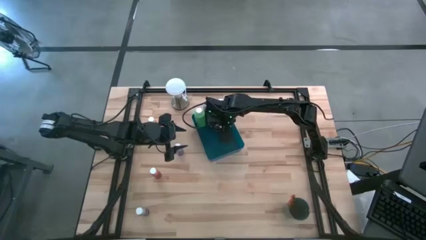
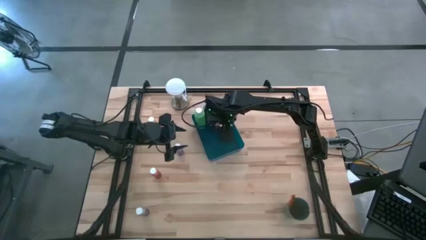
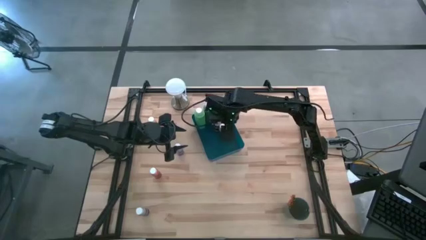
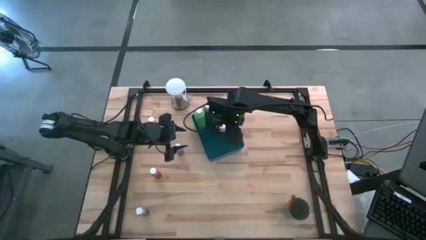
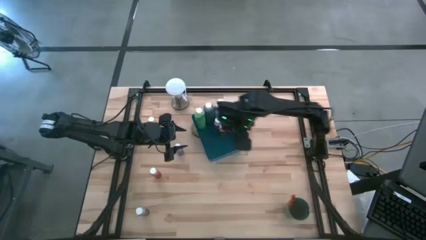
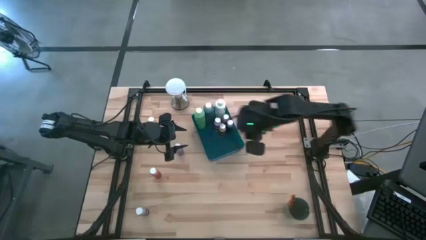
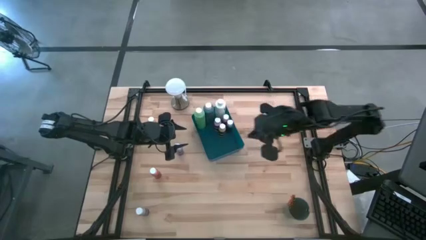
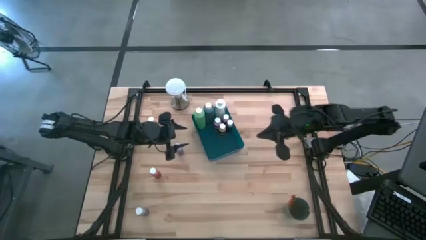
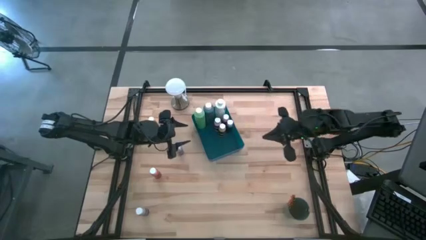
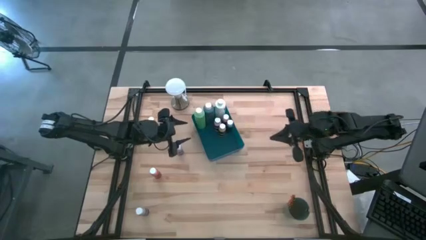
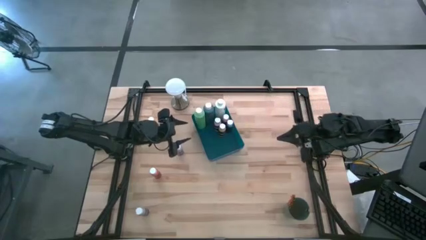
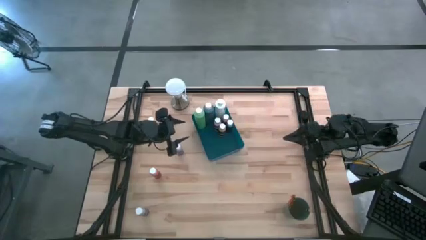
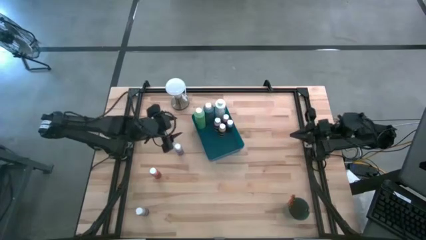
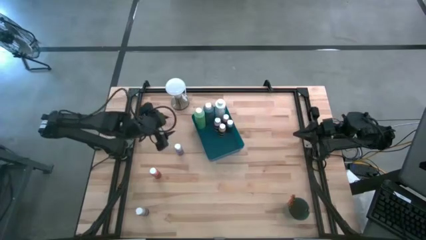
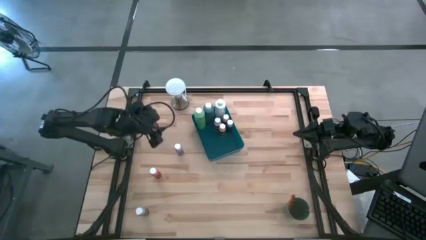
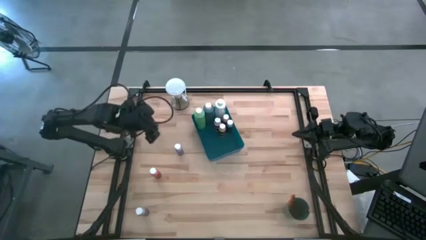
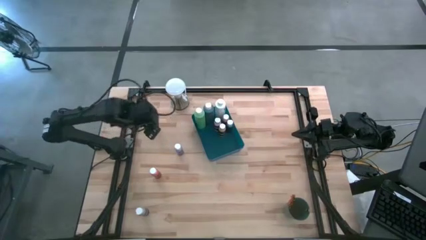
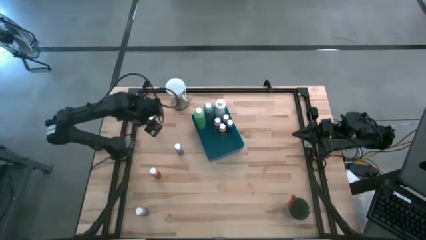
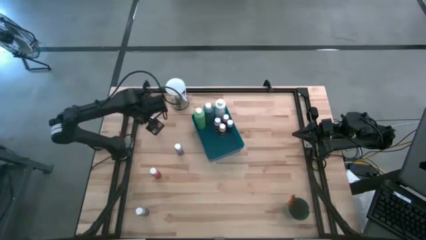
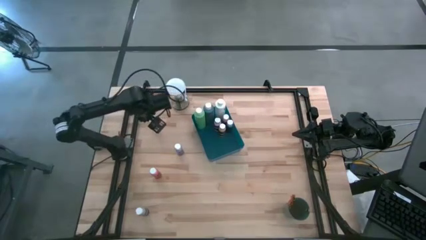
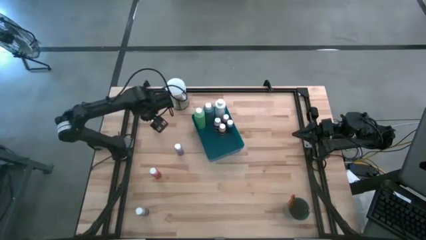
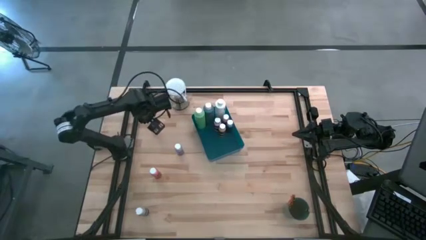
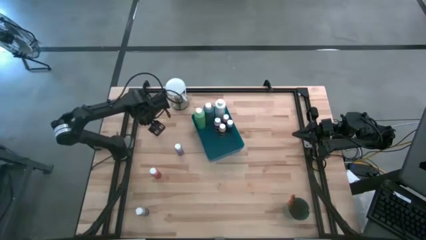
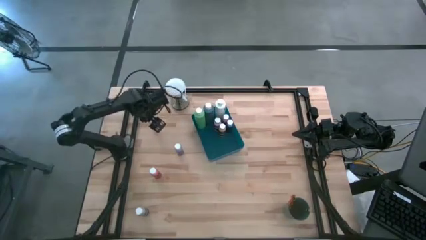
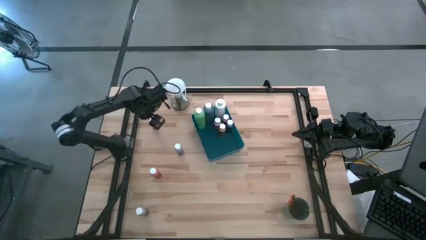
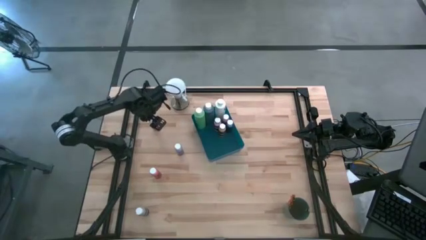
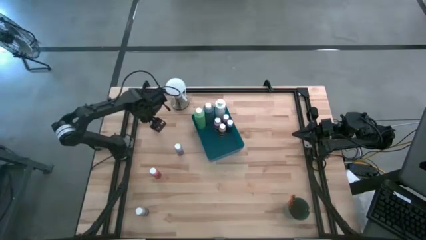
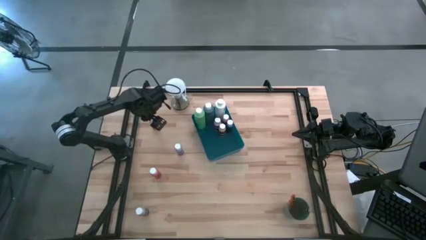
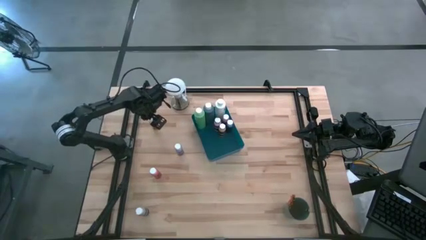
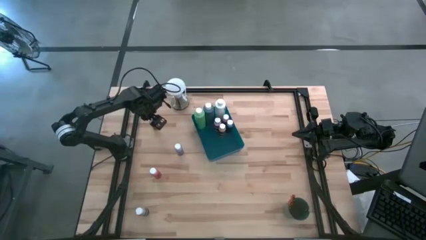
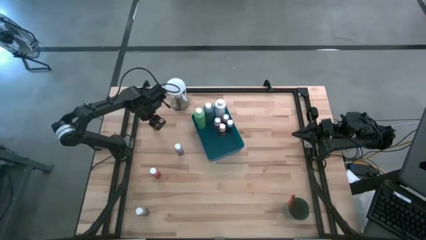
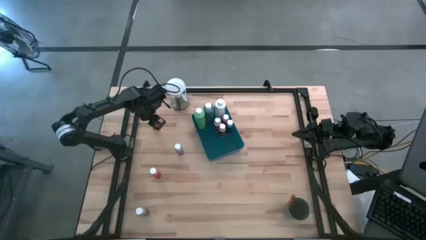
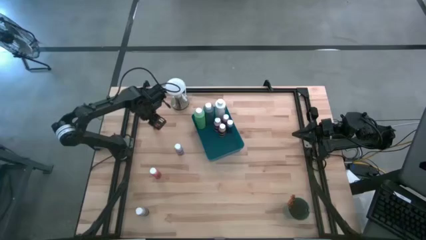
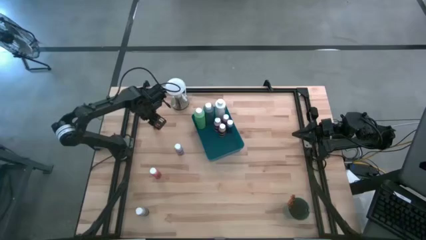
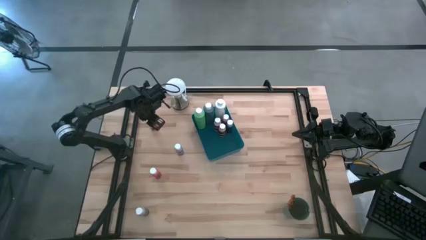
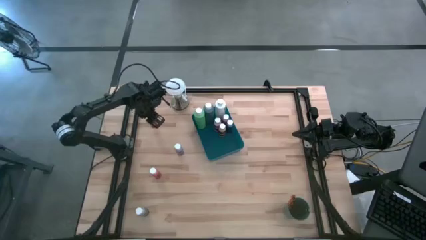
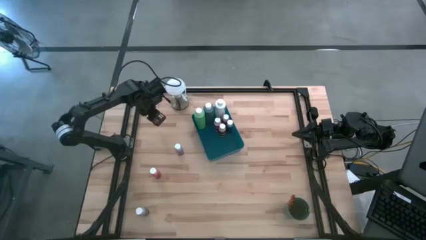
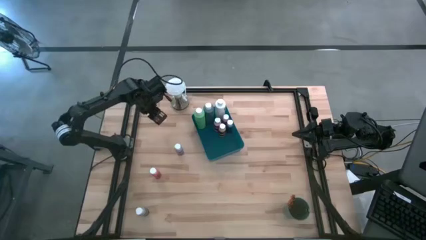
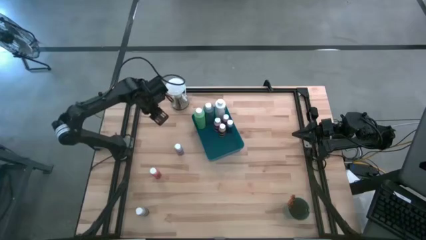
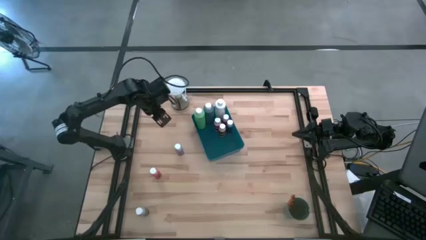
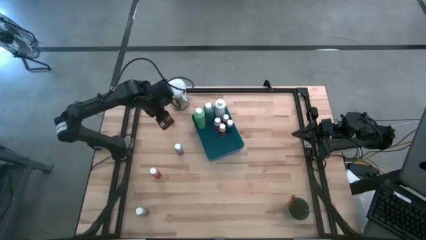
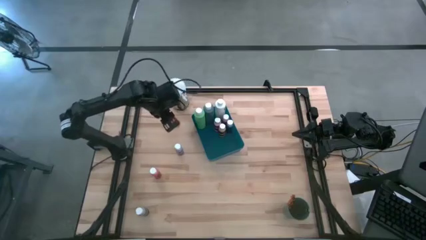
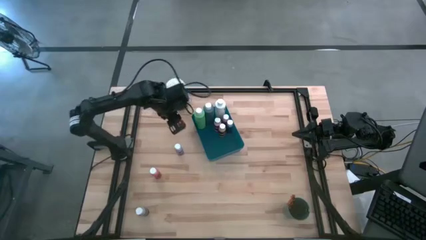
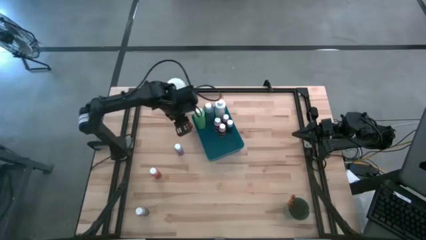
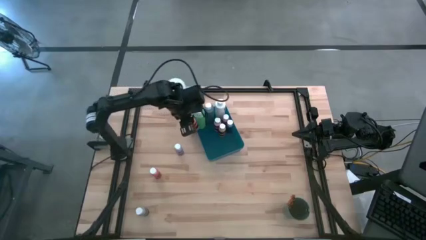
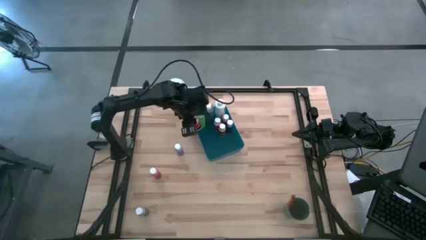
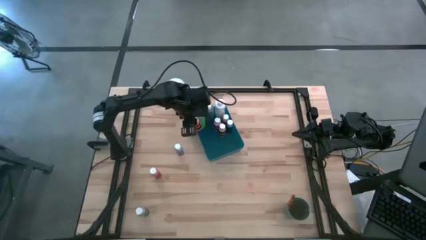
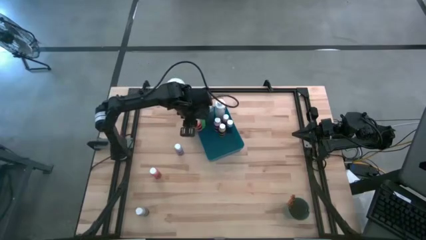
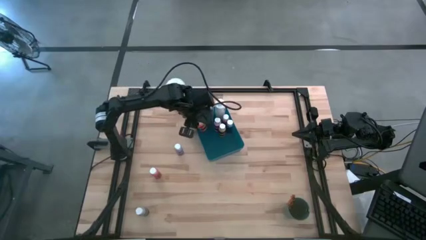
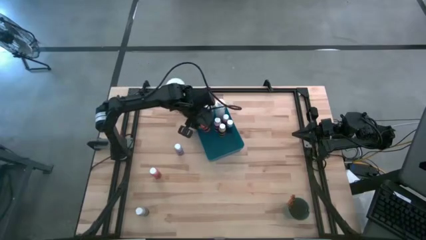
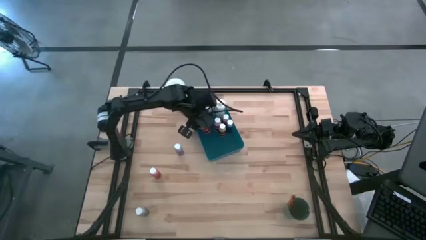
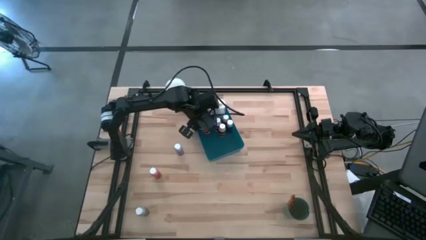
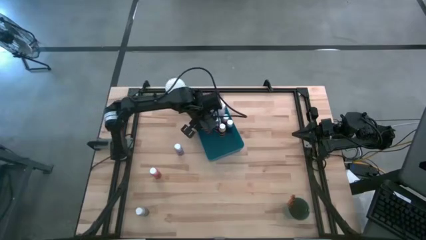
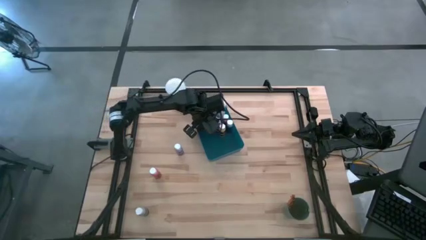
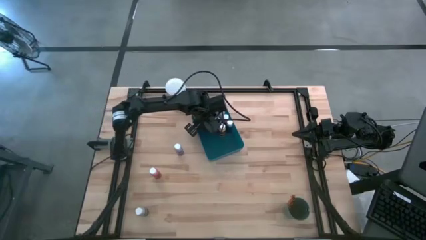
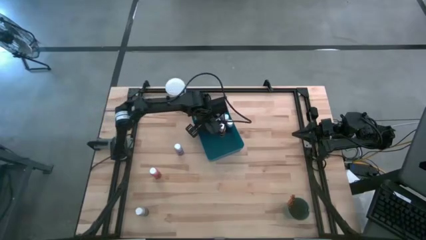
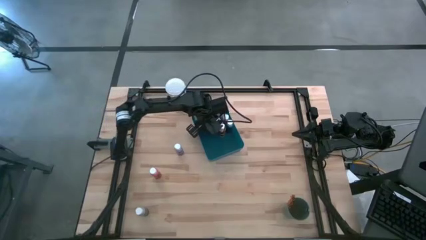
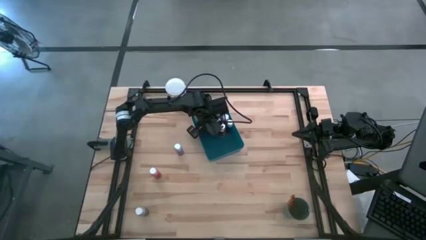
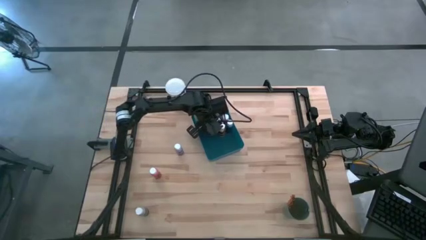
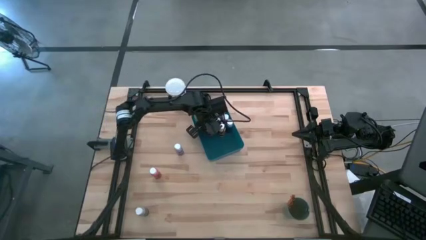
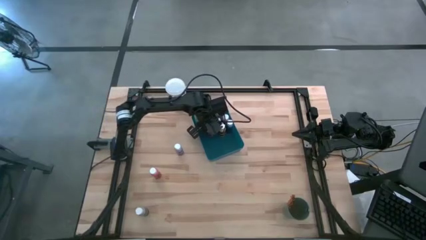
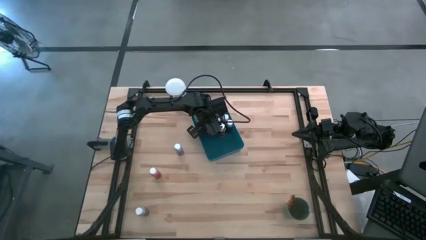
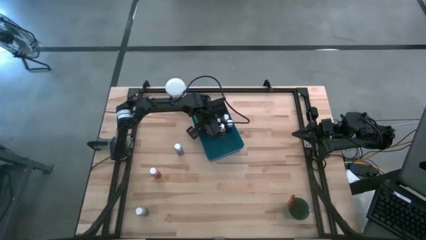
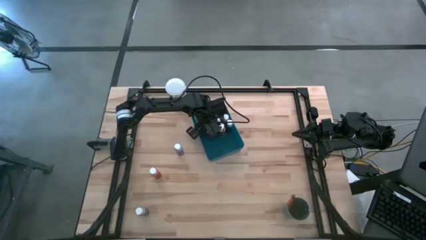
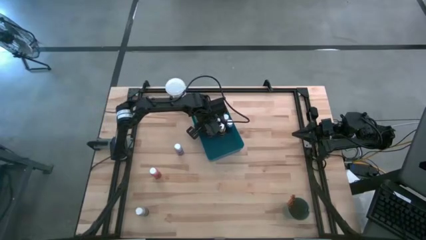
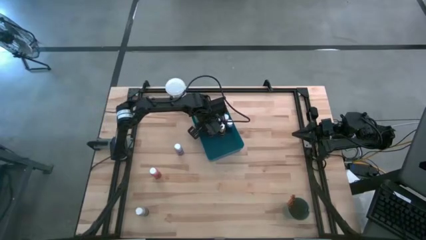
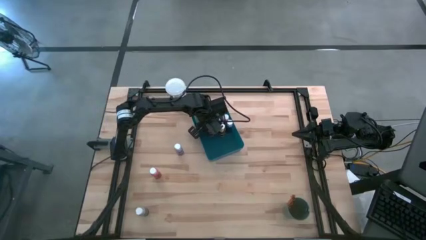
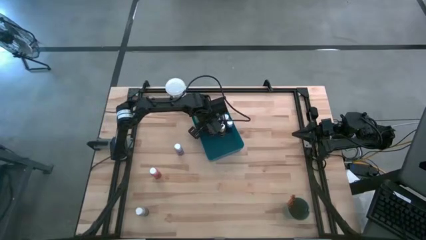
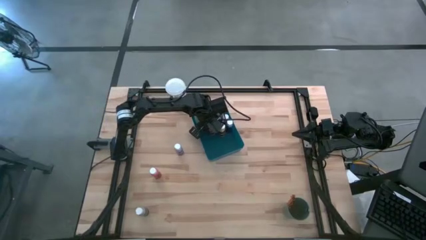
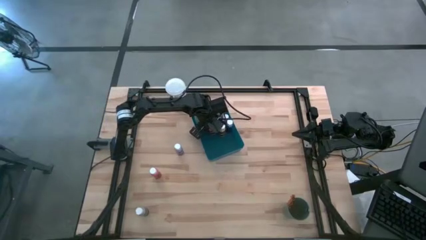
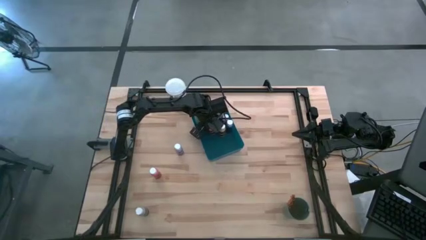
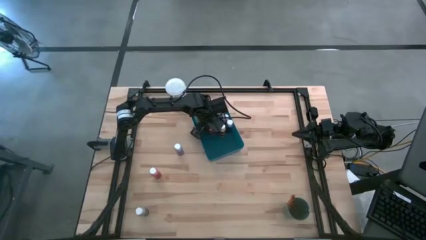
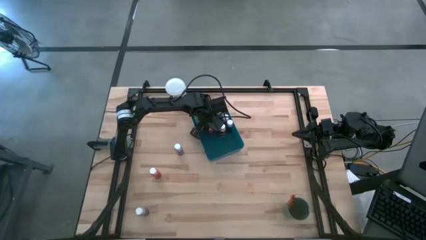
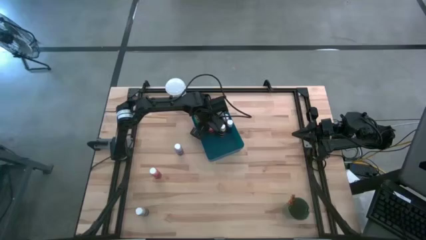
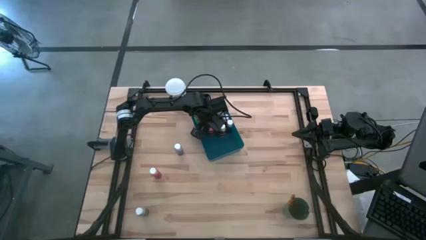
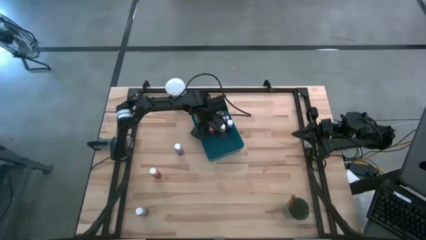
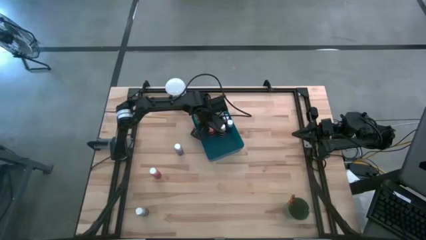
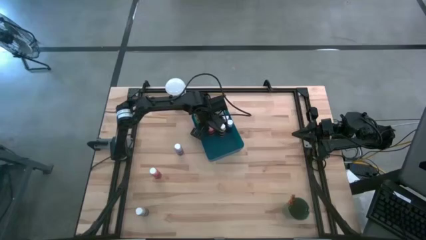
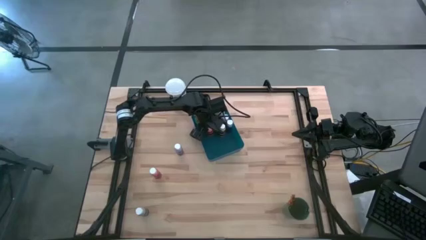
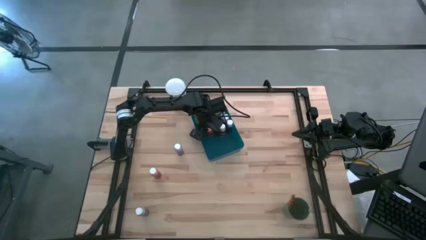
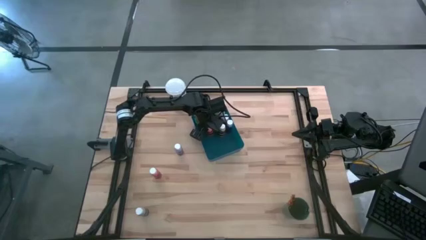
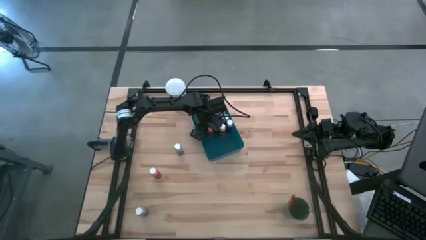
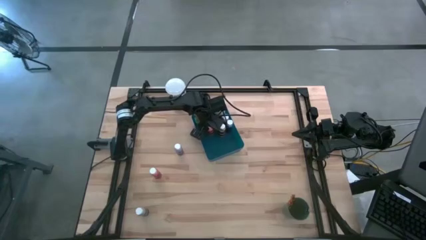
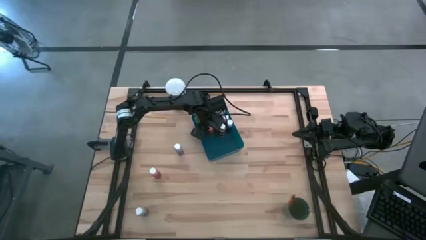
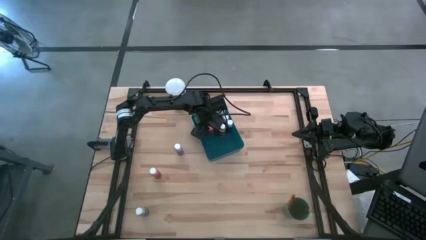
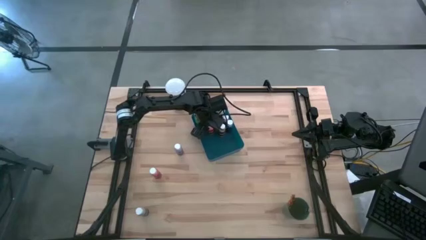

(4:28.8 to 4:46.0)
Task: Pick & Place Paint Supplies
Put the orange paint bottle into the blue bin
